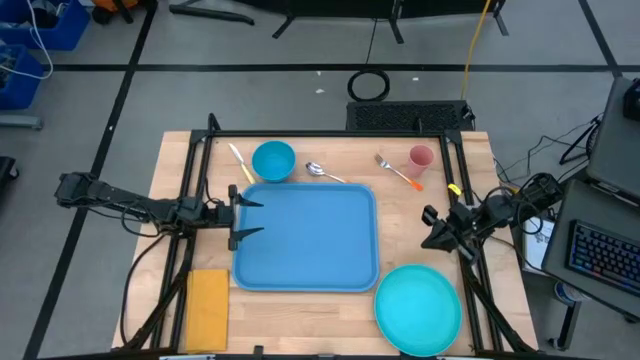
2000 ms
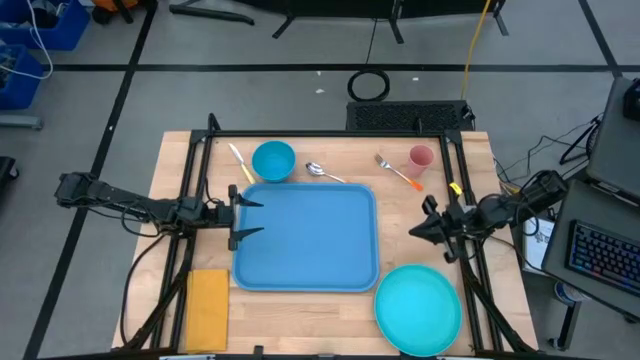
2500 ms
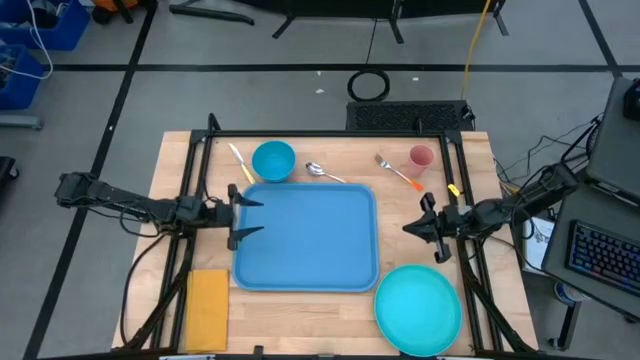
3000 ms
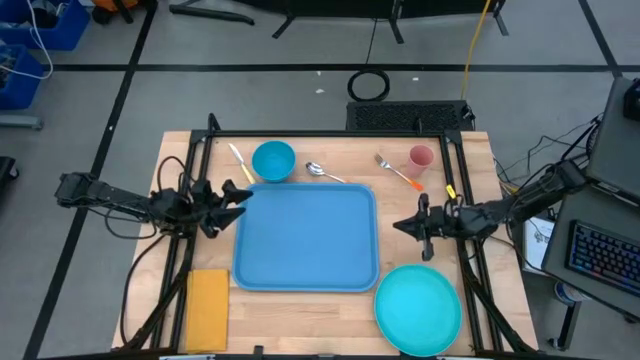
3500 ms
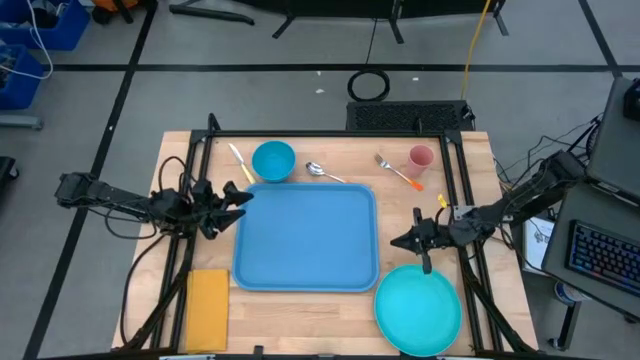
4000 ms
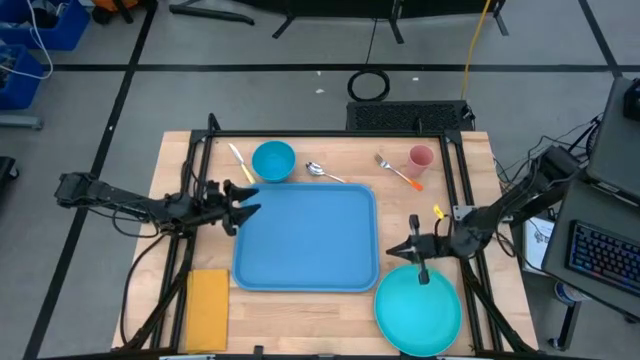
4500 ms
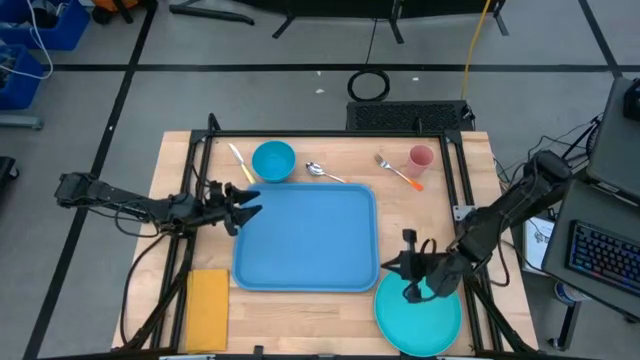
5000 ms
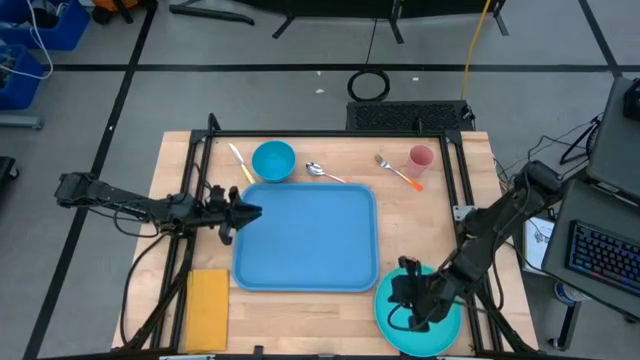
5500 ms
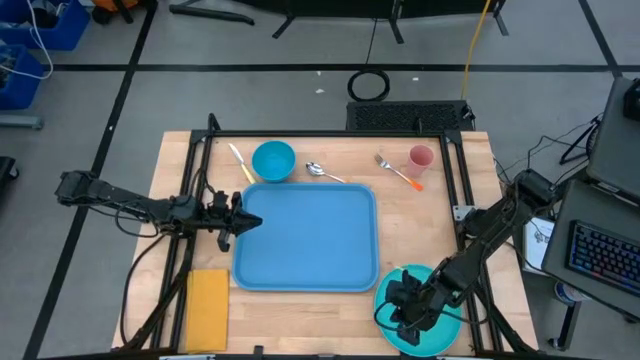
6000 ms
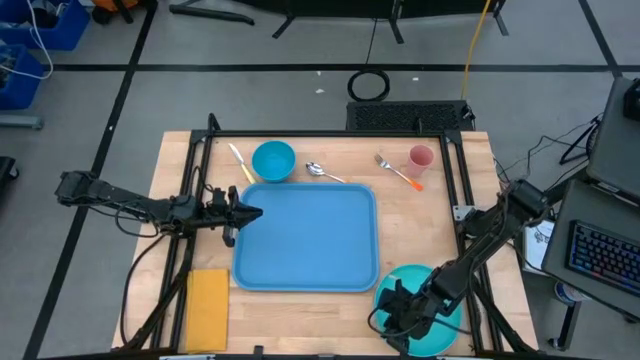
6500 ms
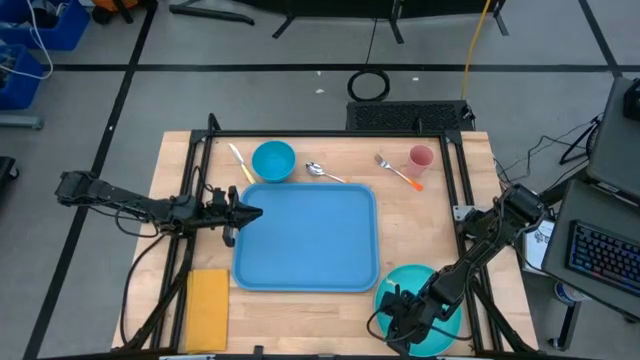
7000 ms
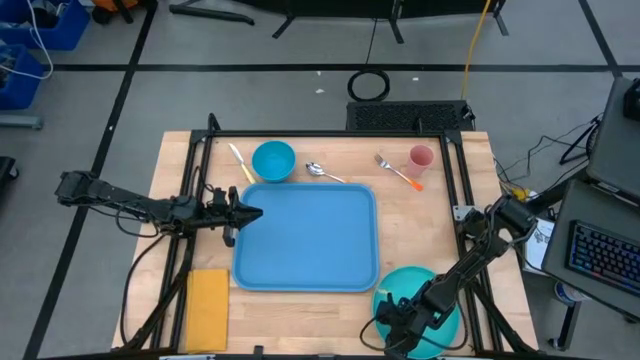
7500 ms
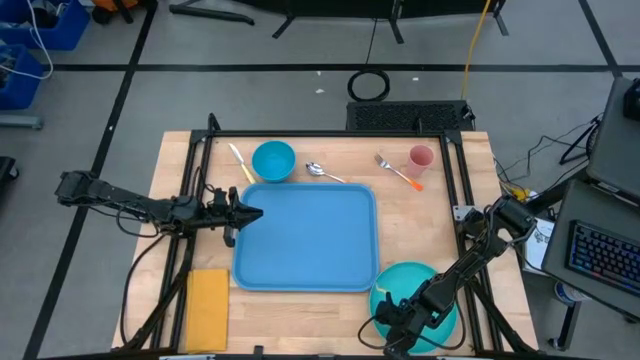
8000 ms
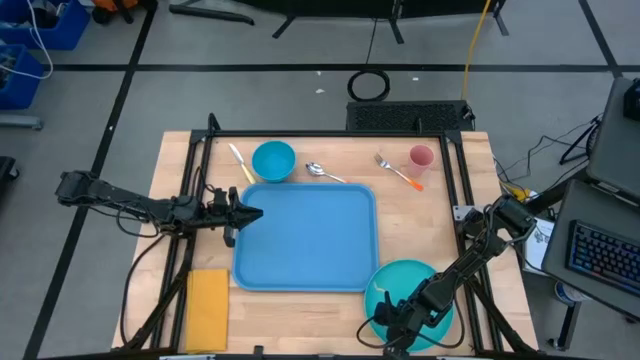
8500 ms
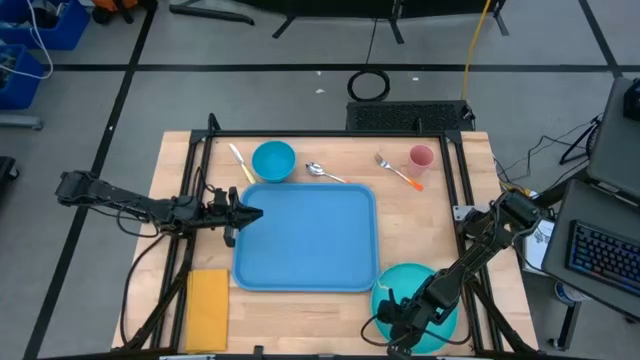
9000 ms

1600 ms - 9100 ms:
Task: Set up tray
Put the green plate on the blue serving tray

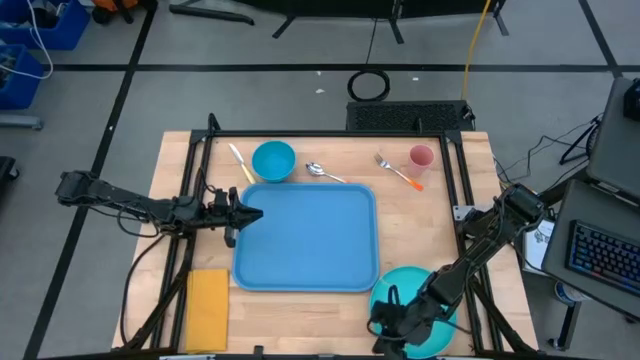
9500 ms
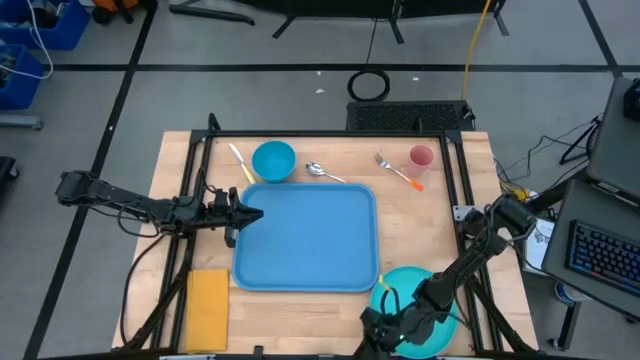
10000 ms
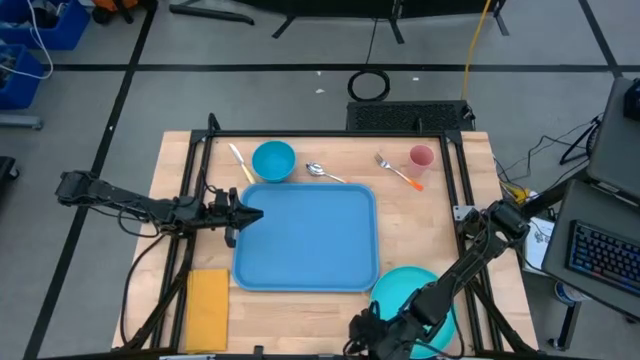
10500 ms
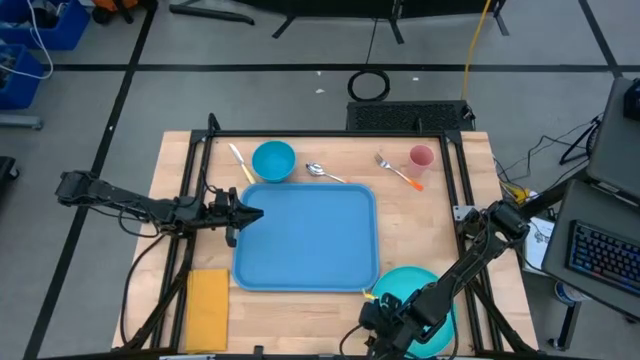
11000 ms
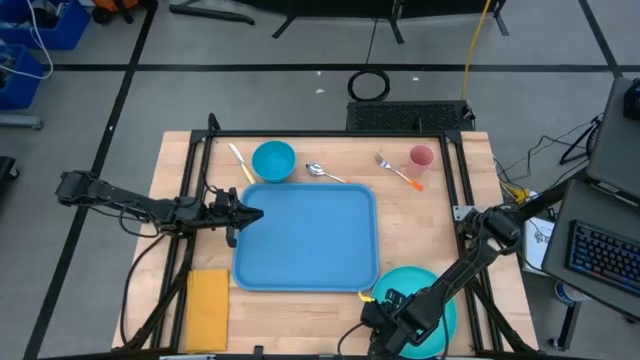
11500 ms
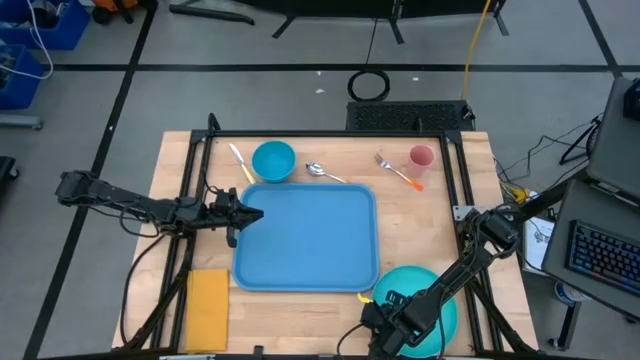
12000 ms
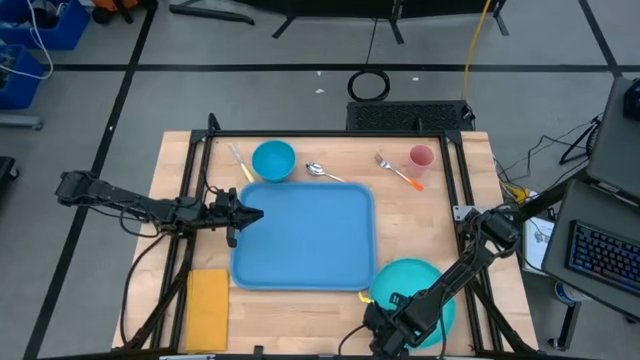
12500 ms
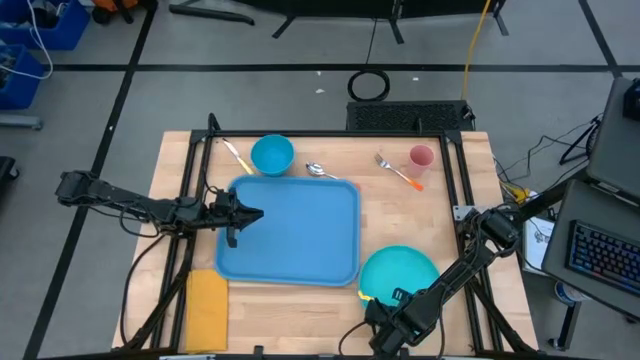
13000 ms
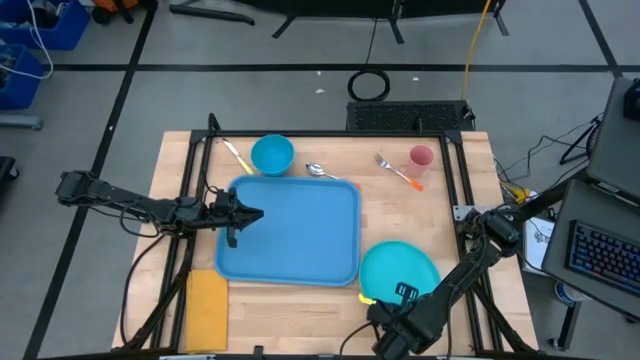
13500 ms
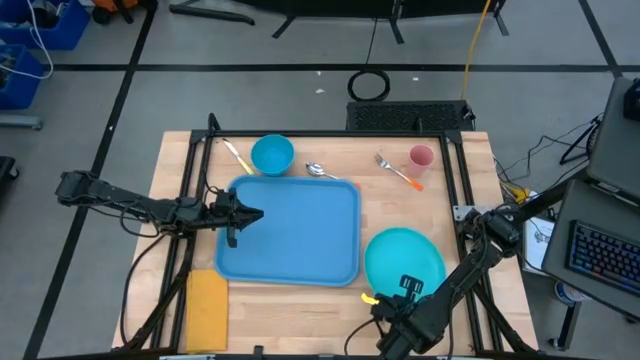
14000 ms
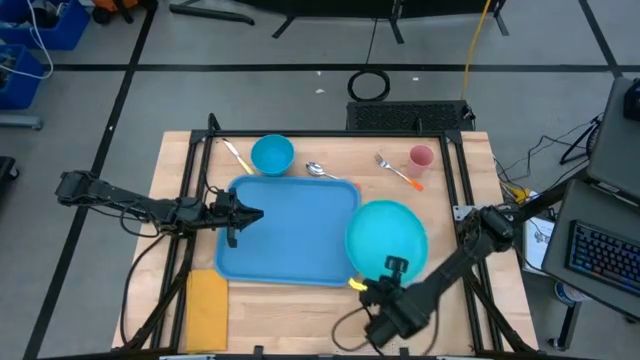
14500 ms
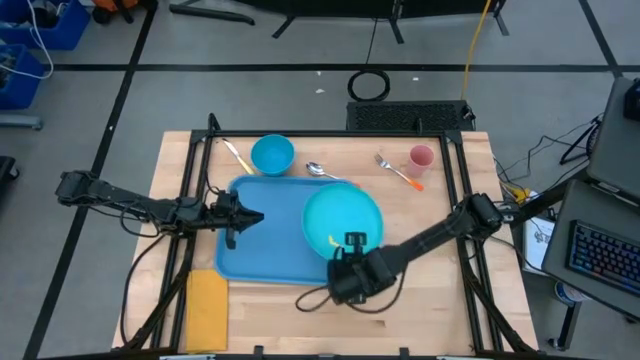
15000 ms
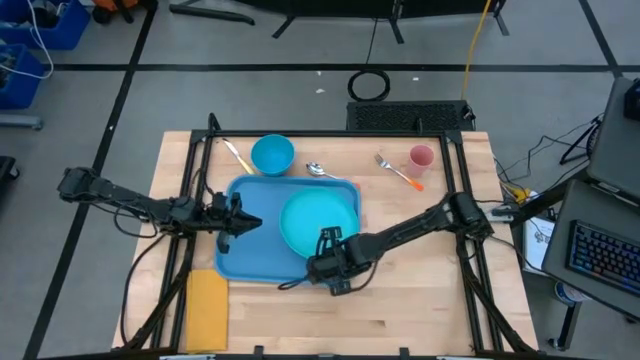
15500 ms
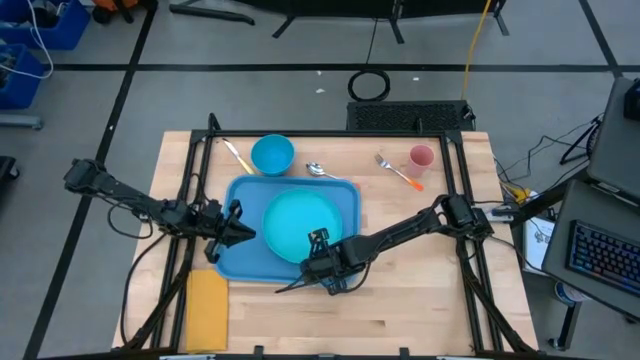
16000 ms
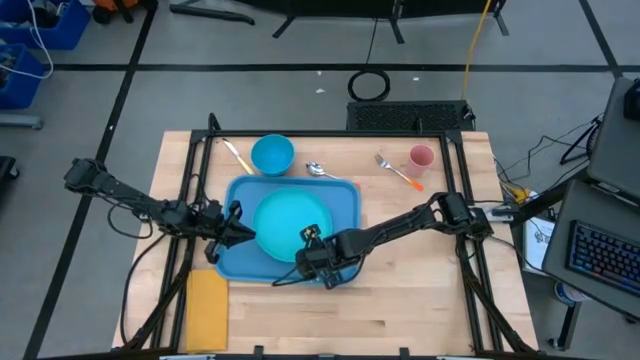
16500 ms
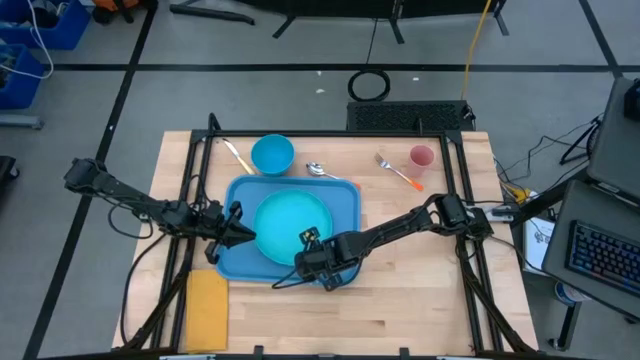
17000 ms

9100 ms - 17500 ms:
Put the green plate on the blue serving tray

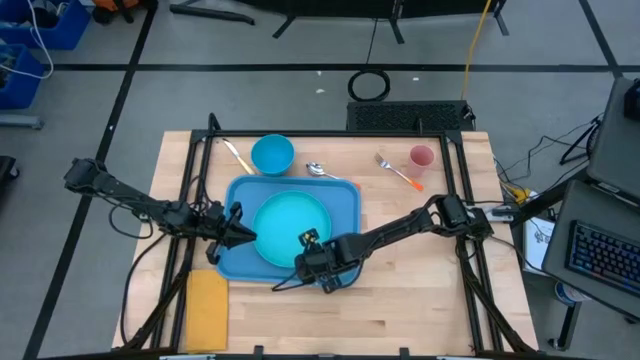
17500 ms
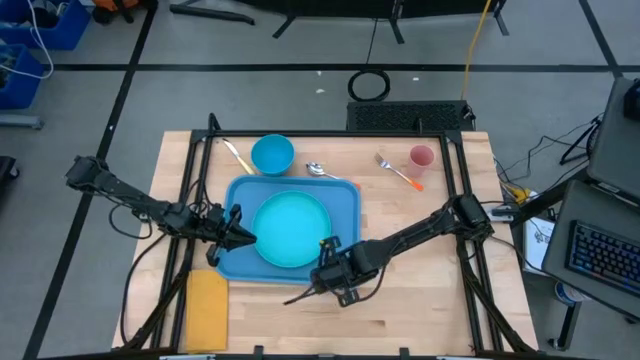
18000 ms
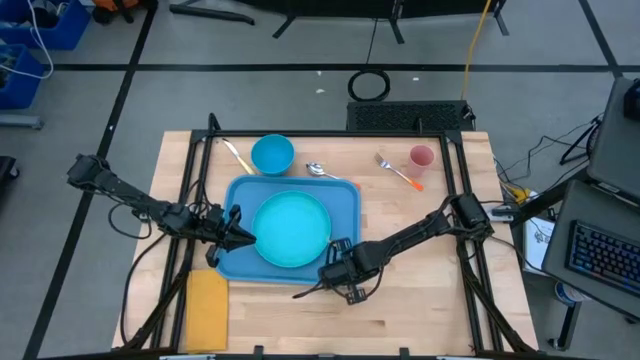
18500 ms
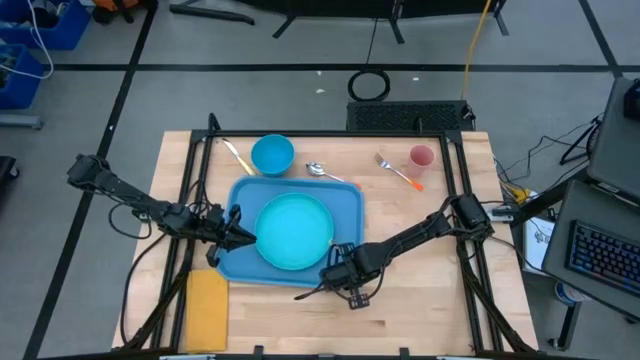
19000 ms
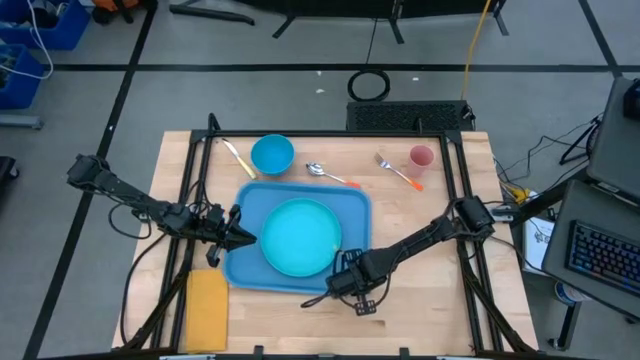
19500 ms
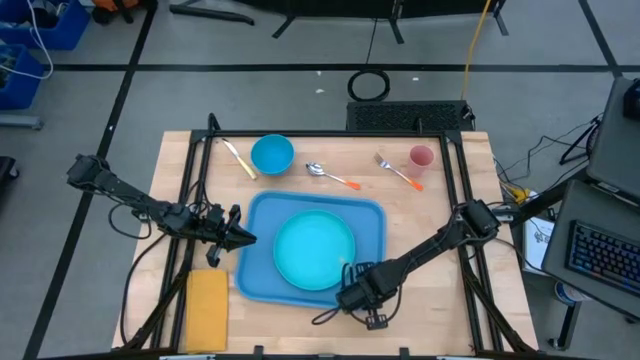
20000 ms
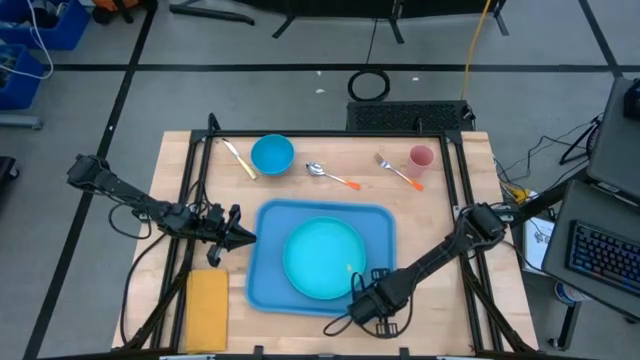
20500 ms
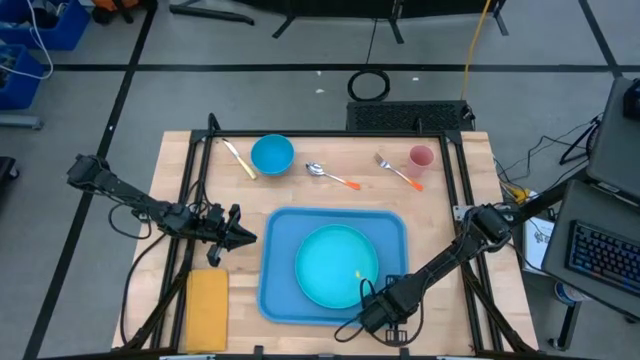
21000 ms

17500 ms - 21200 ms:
Adjust the blue serving tray
